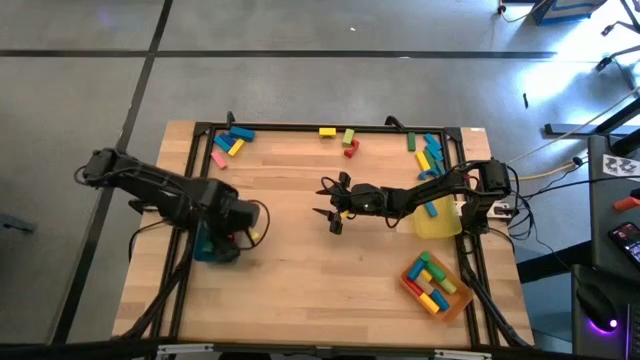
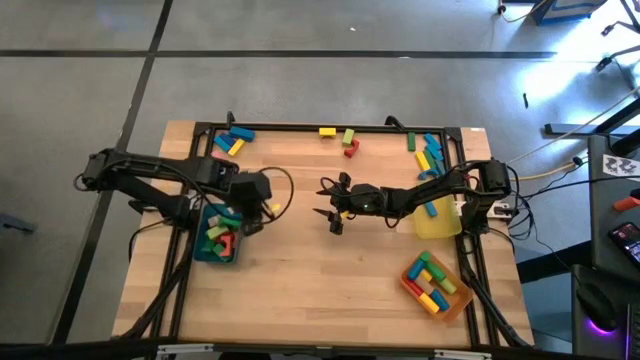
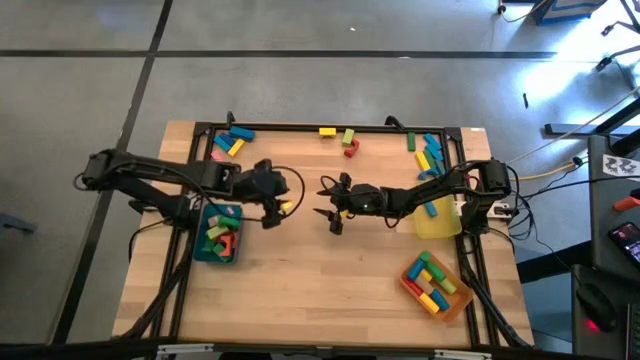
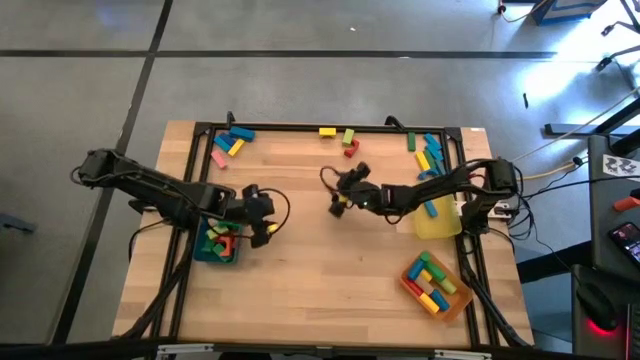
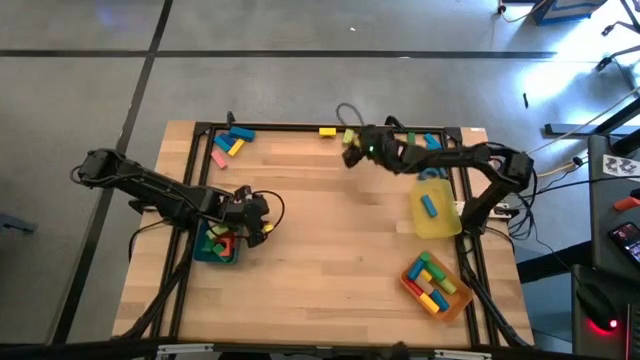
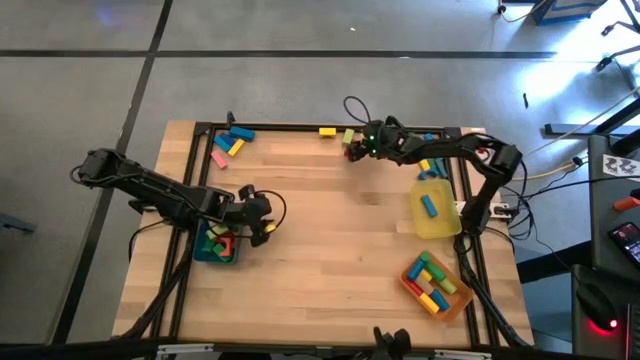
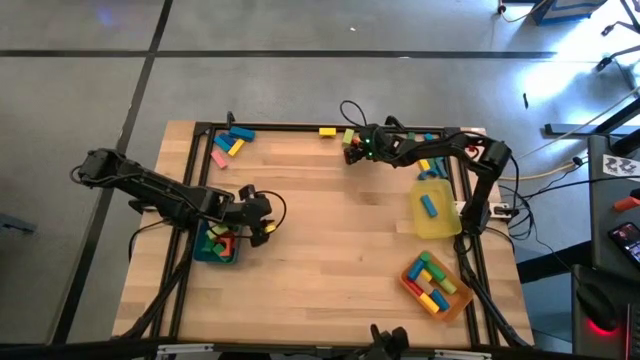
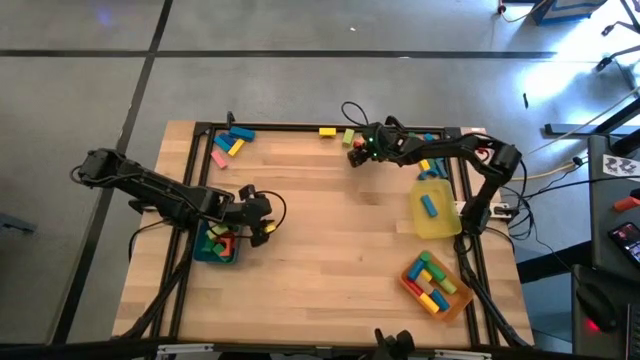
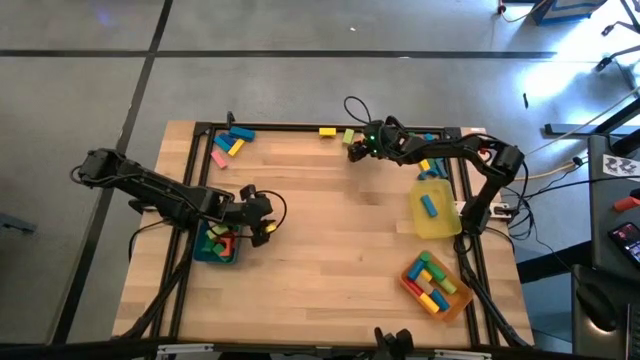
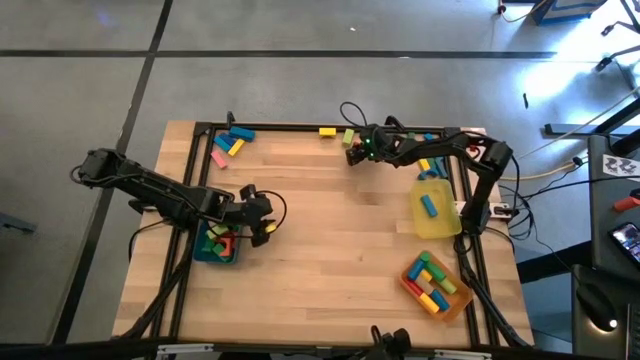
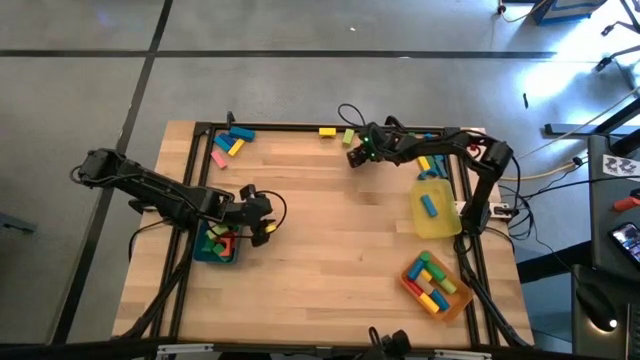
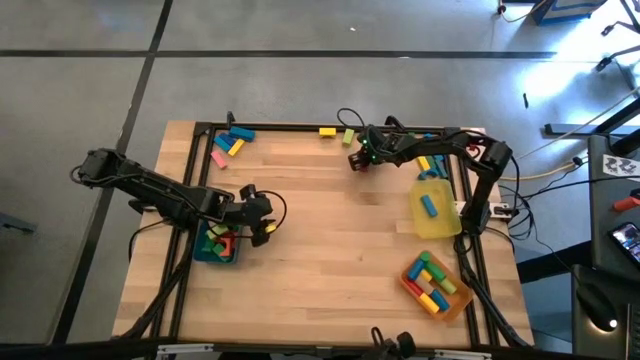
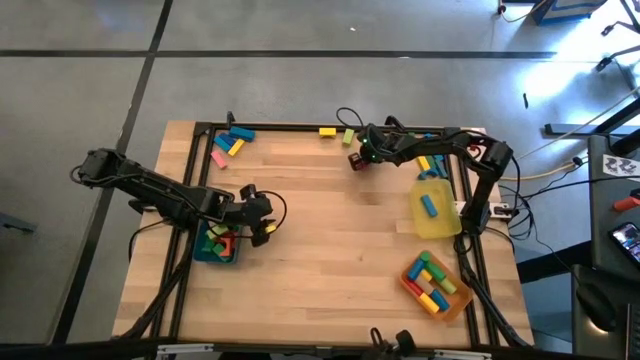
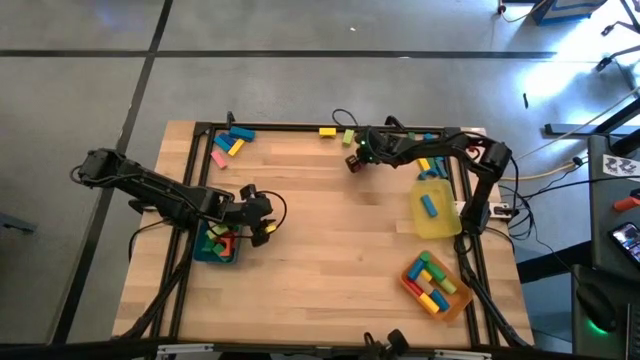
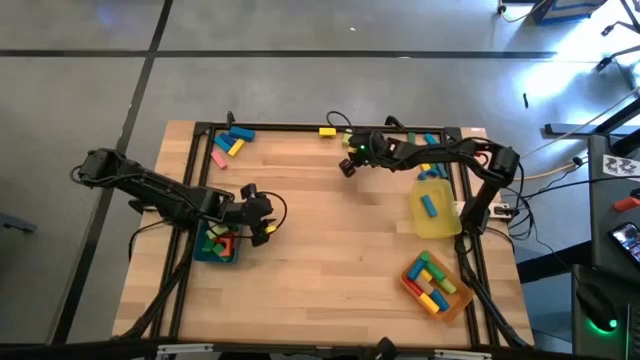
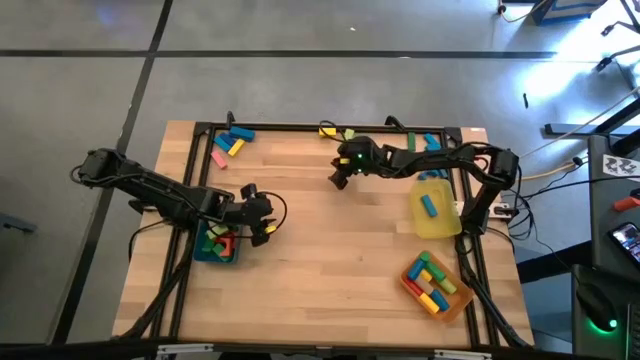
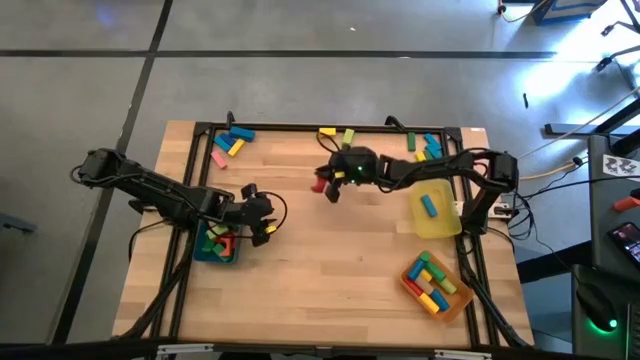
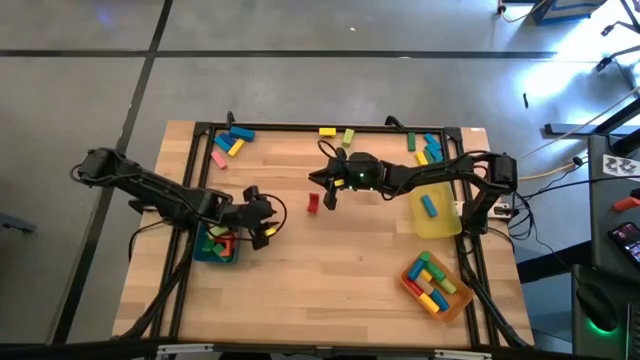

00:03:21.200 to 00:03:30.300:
Task: Sort blocks by size
Put the red arch block into the blue bin

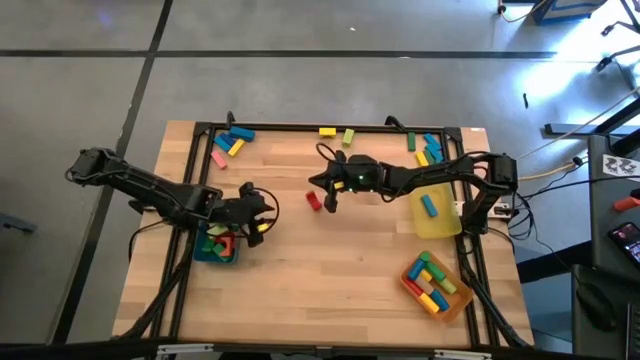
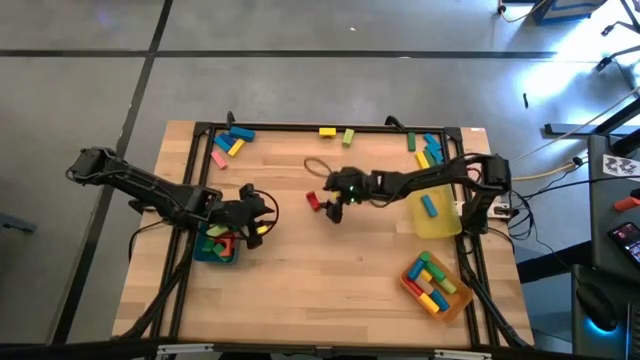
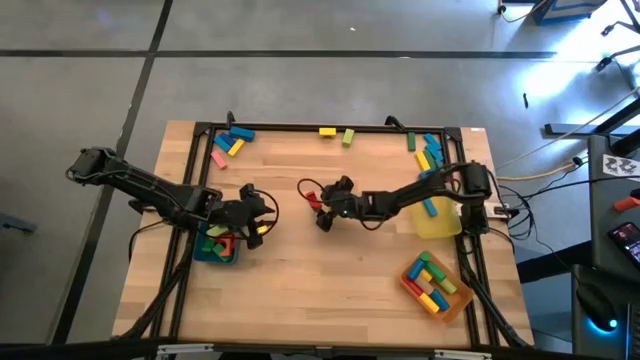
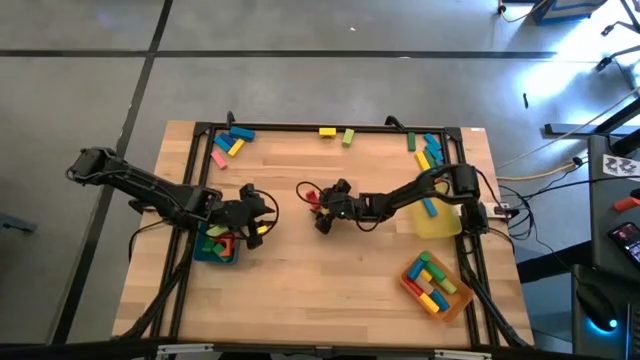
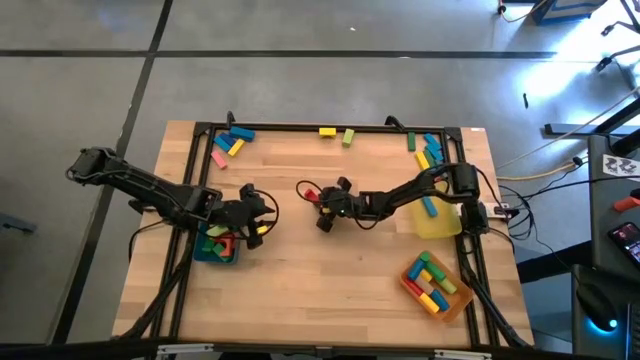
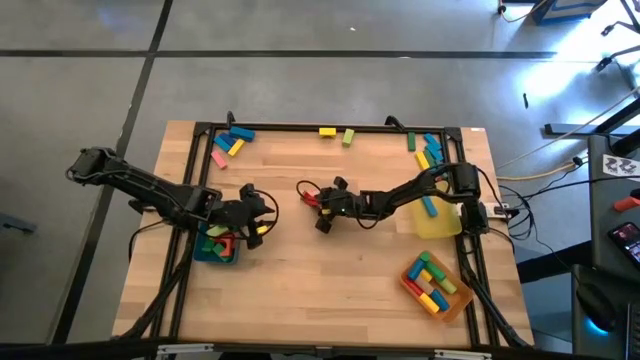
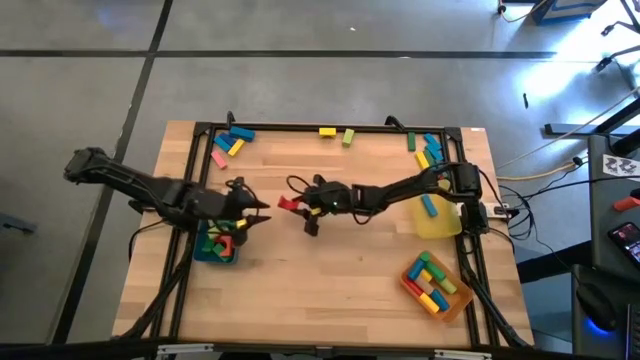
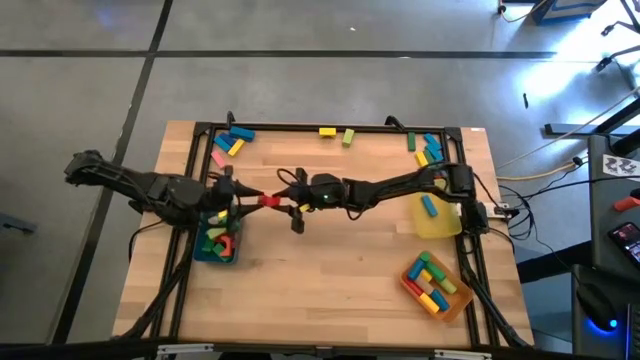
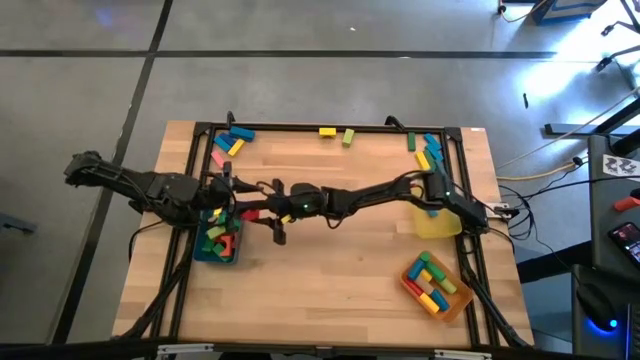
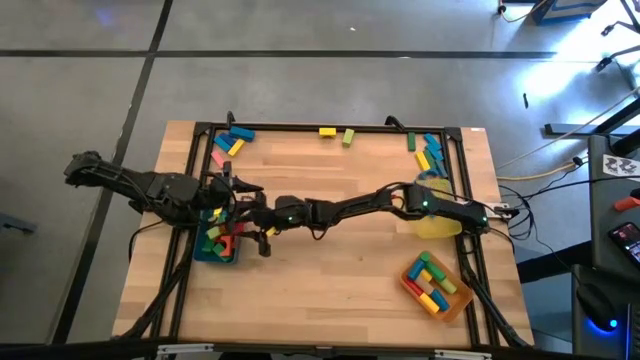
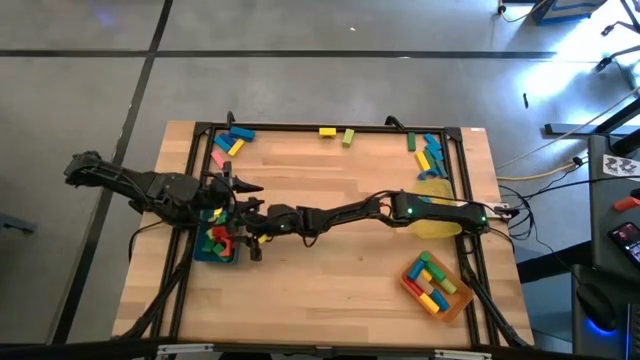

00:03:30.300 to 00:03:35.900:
Put the red arch block into the blue bin

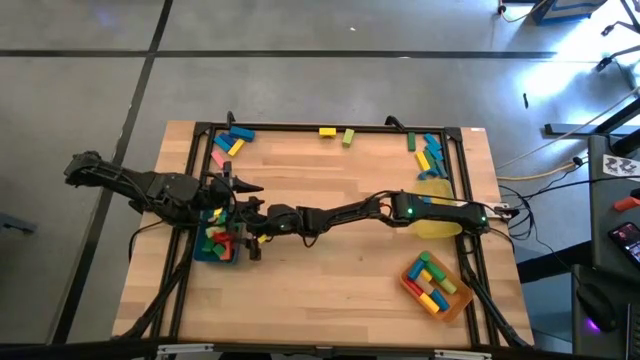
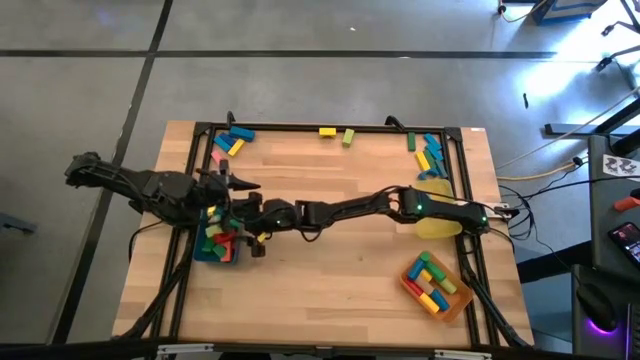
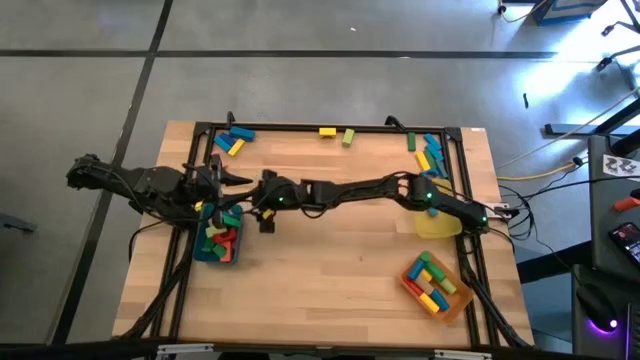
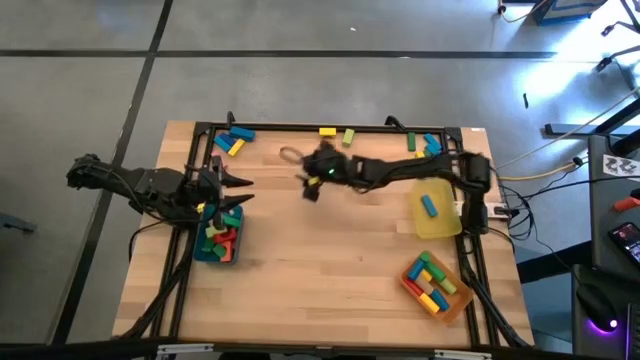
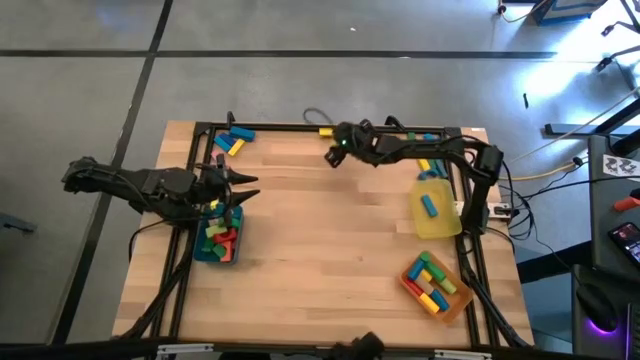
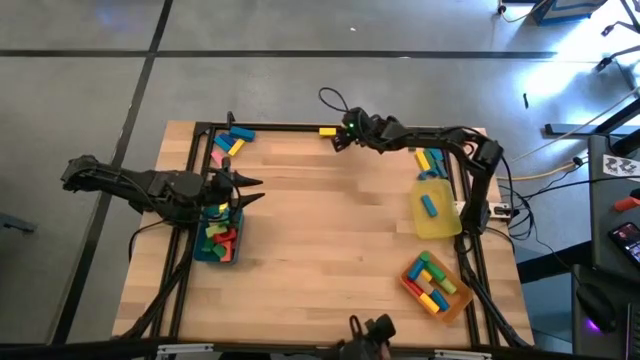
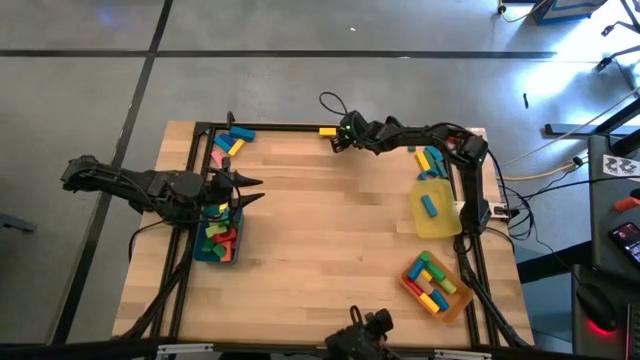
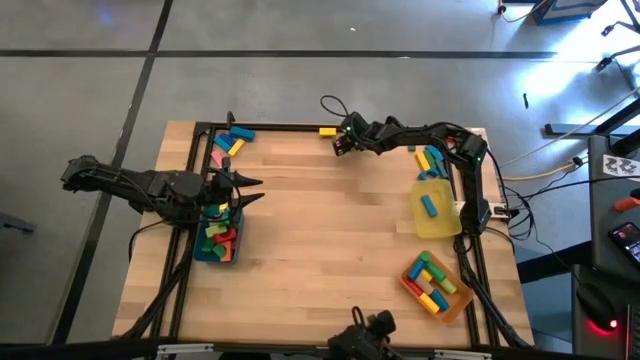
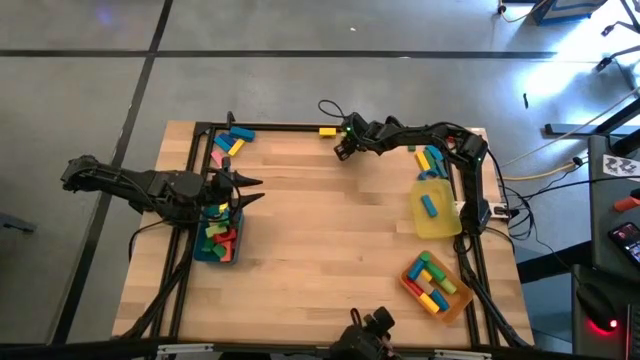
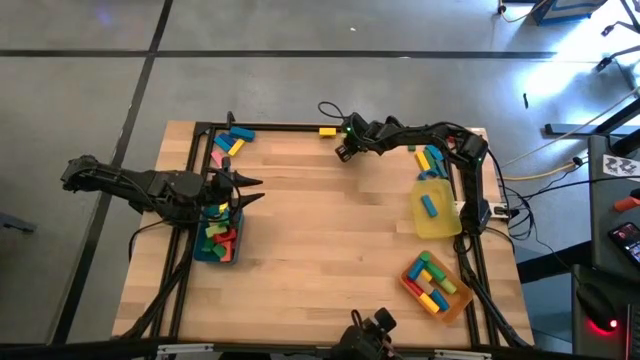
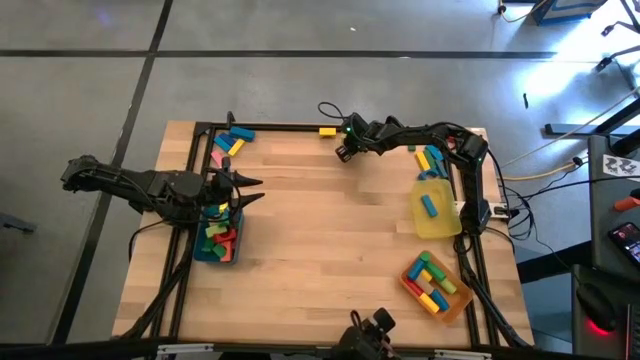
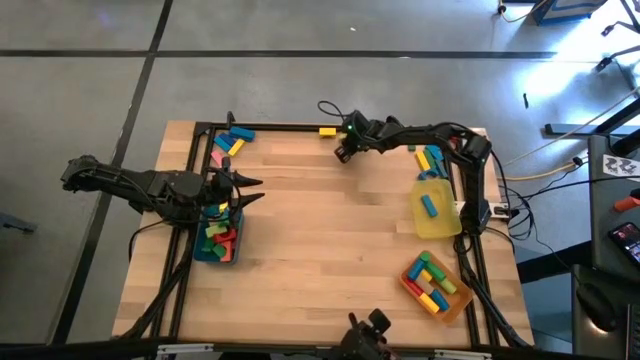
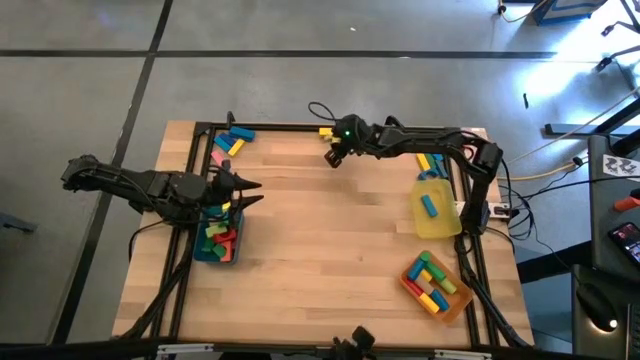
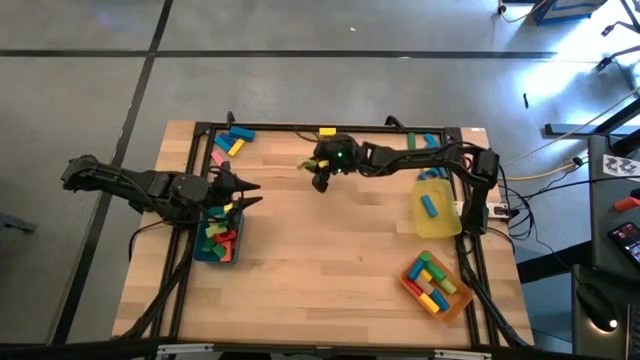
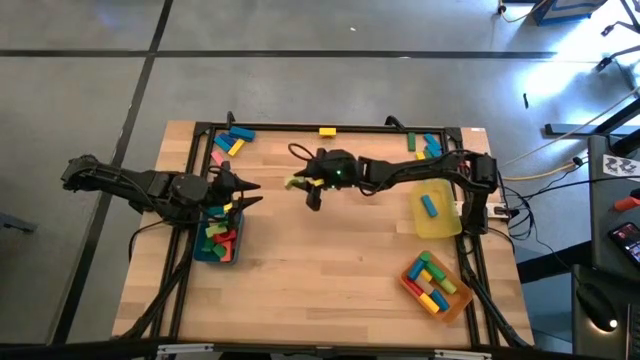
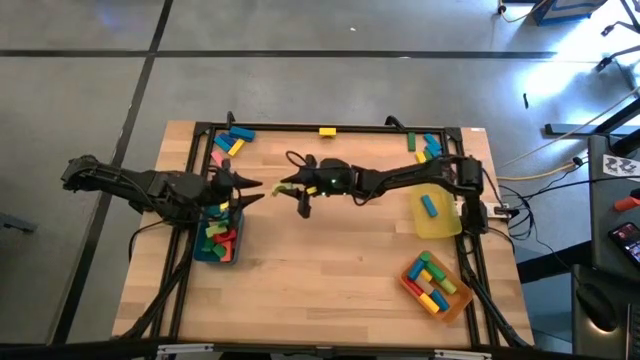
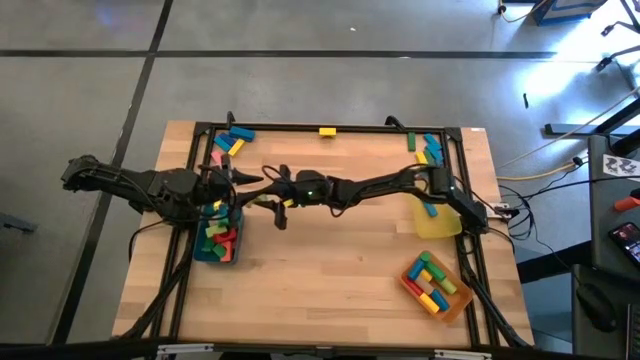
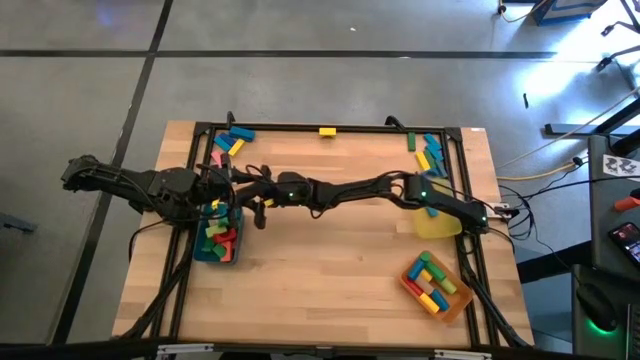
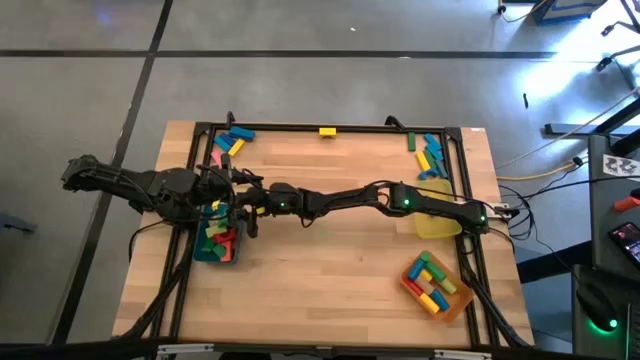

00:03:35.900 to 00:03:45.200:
Put the light green arch block into the blue bin
